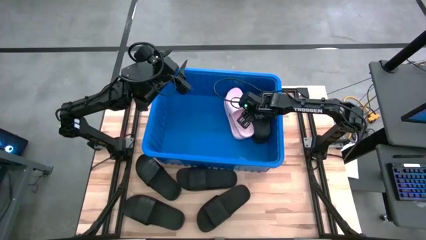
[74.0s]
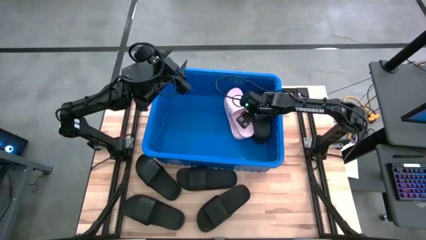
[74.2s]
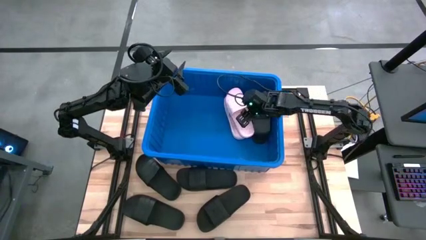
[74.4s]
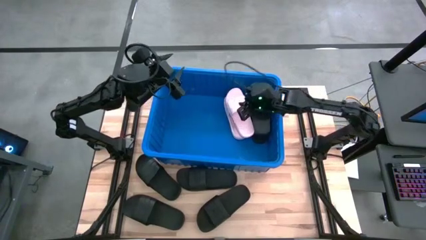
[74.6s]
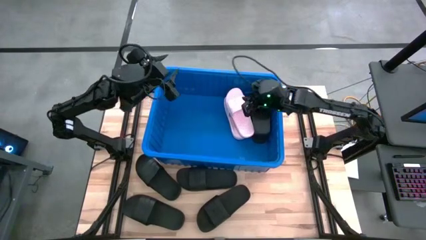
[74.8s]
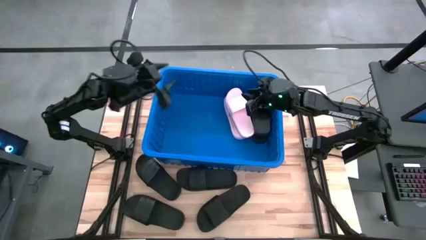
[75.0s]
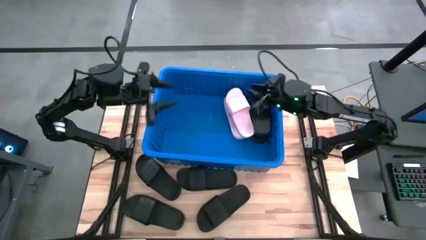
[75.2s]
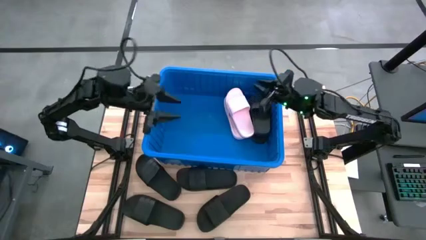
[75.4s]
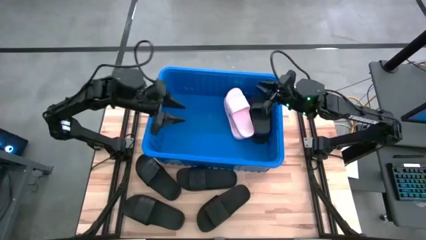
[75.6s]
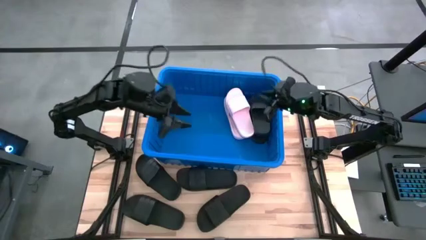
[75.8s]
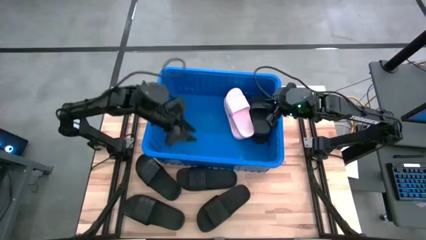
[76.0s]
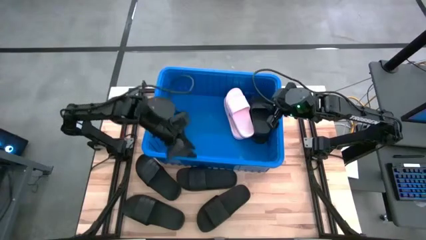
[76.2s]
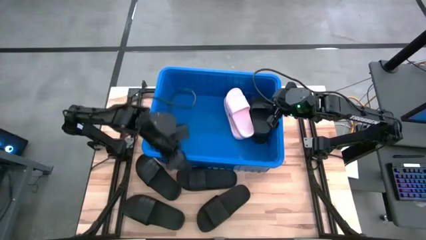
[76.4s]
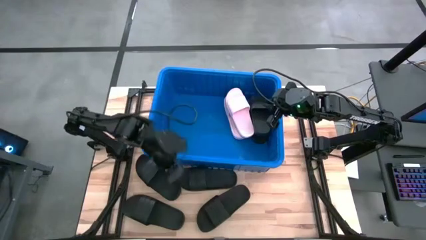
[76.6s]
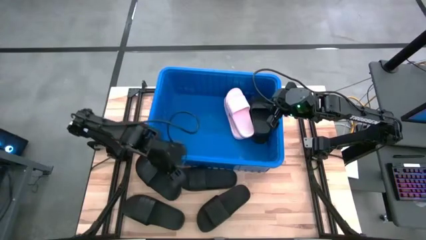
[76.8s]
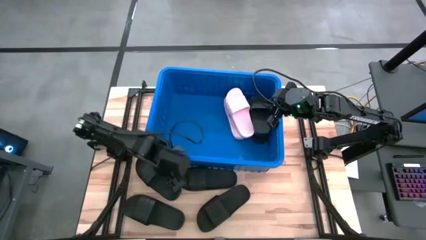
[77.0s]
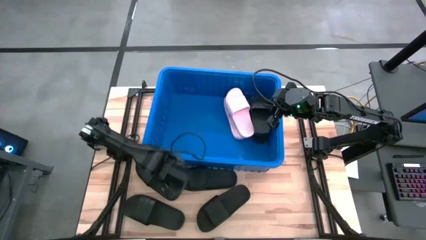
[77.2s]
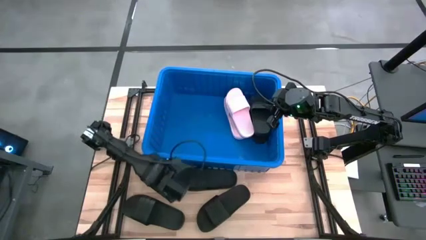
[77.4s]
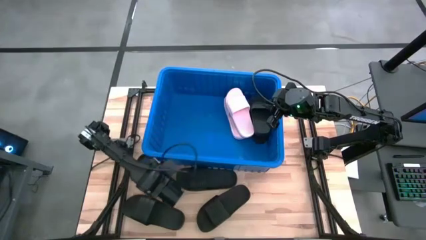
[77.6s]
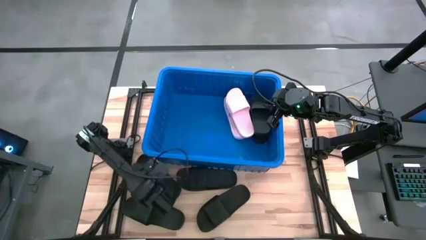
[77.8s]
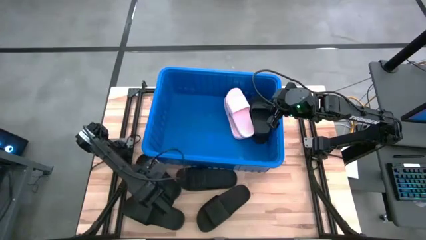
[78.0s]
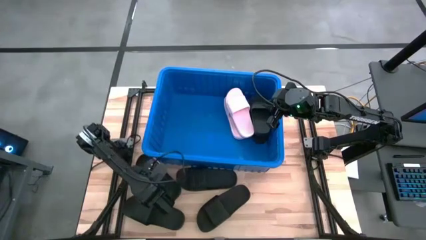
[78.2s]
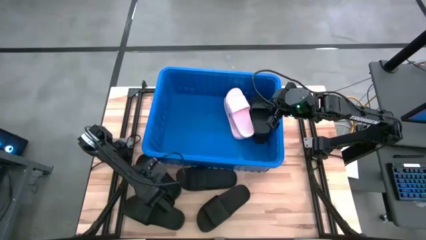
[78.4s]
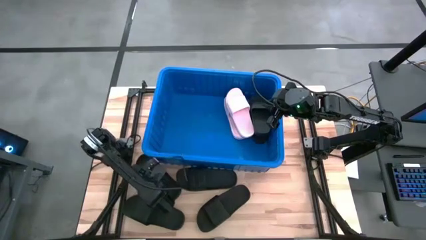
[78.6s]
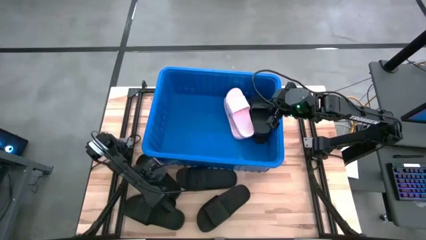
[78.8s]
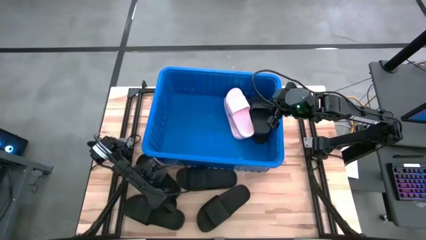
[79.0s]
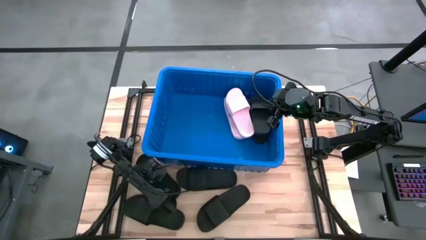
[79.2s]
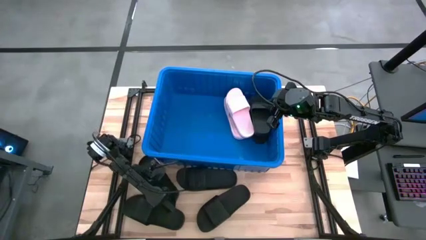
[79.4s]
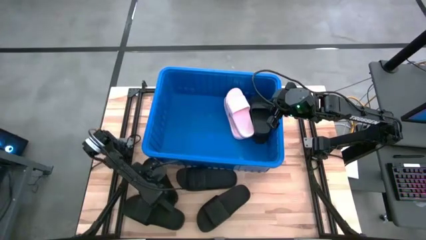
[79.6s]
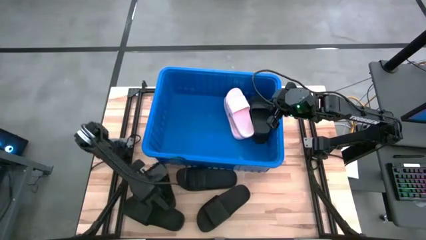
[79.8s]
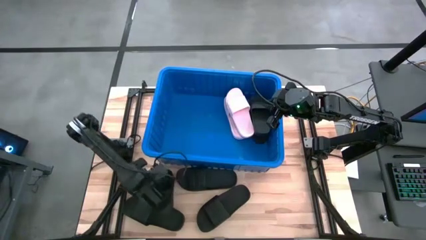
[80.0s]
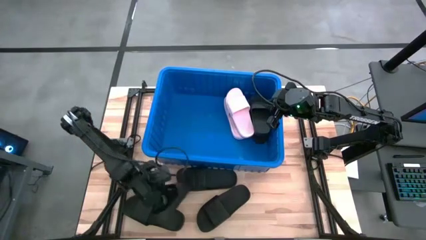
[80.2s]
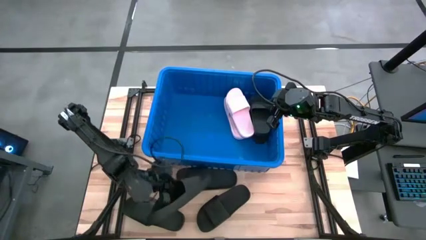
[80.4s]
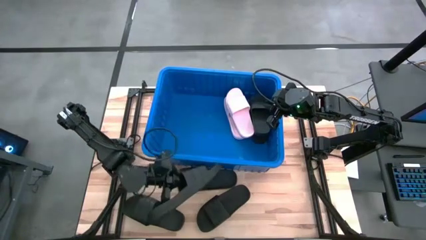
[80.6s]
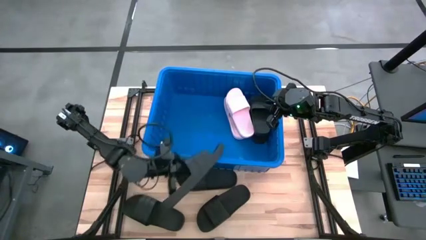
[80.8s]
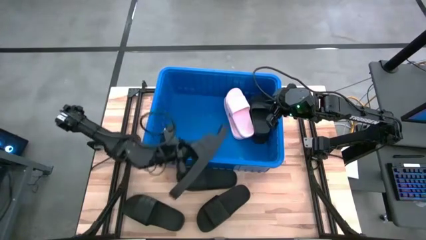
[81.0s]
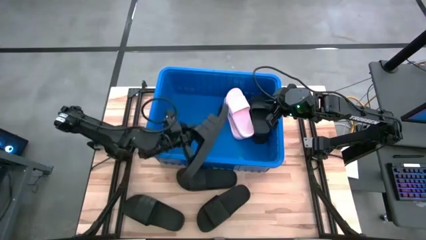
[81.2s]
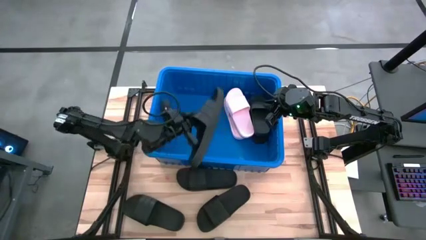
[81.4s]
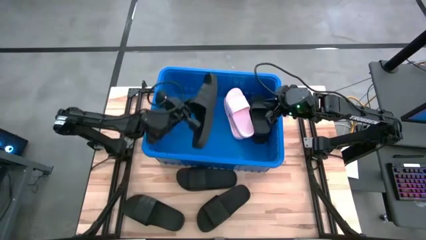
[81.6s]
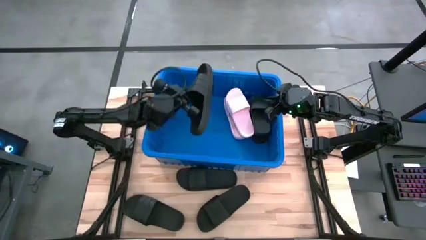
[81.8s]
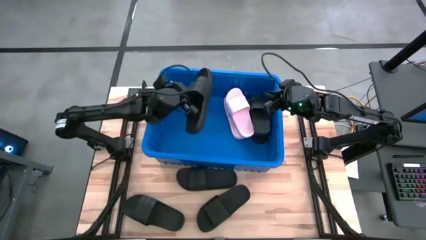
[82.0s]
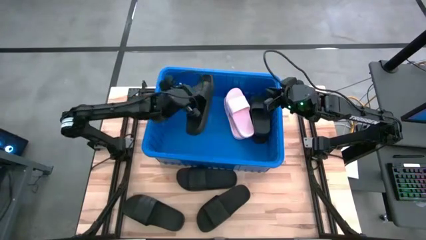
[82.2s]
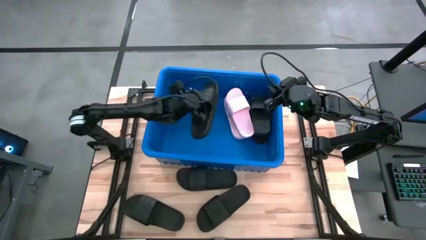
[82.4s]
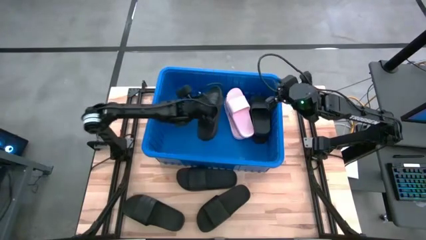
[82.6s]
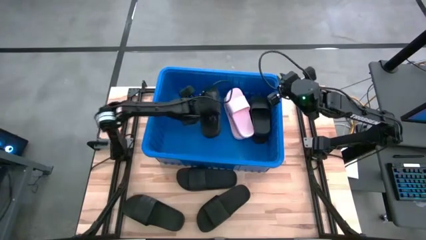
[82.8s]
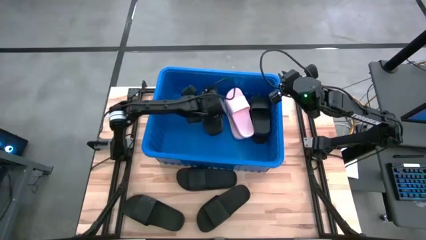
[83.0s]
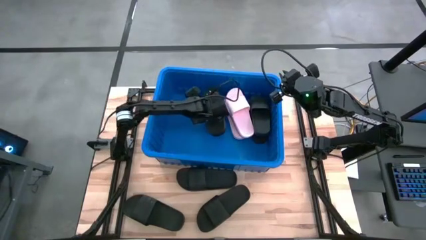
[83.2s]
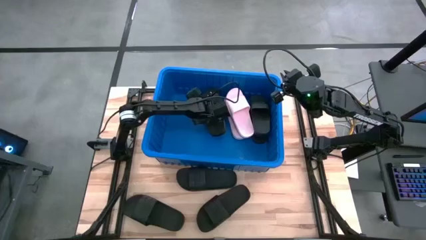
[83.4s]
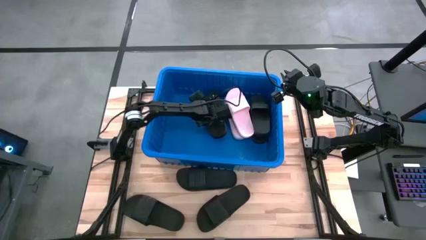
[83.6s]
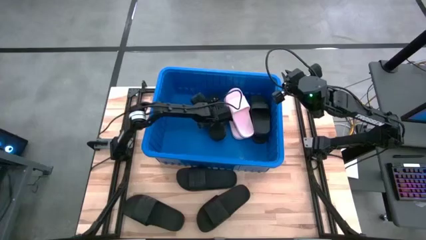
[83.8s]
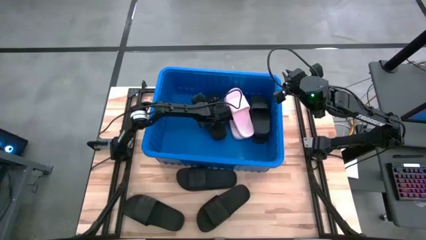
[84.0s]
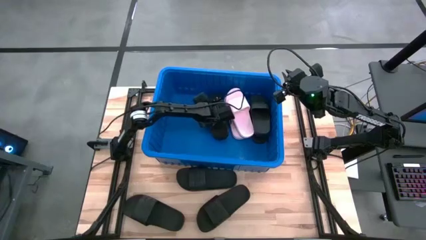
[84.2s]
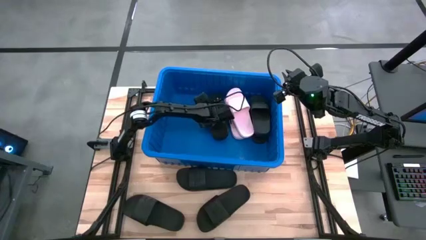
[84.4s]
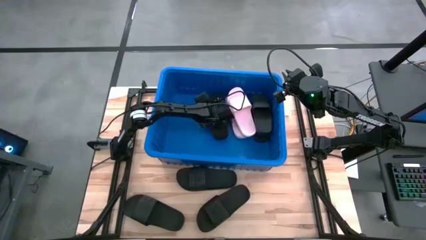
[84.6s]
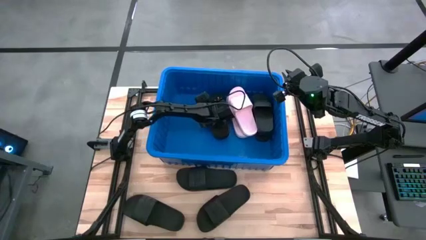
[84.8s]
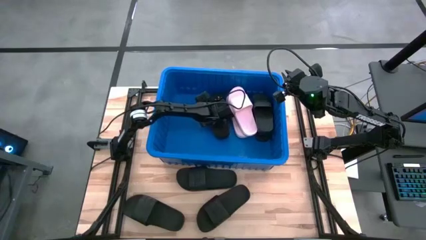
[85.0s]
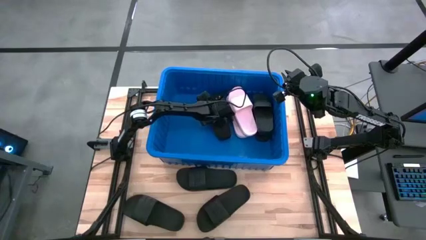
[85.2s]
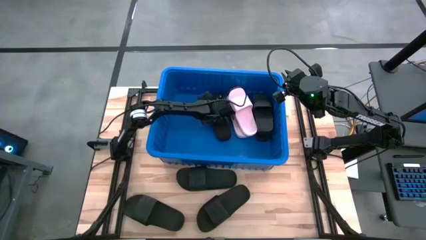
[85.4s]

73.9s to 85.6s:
Task: Pick and place slides into bin
Put the black slide into the blue bin
